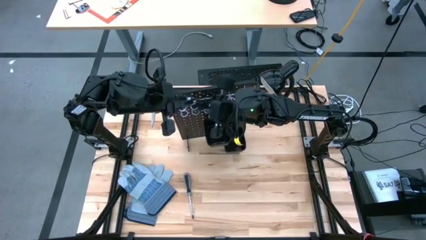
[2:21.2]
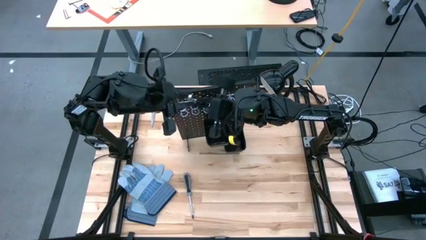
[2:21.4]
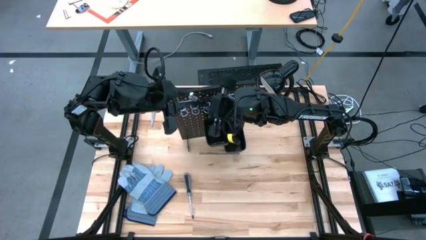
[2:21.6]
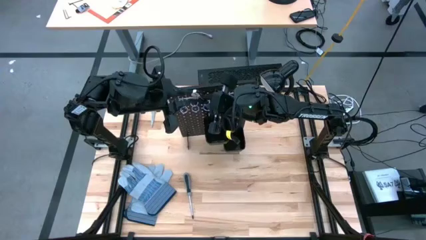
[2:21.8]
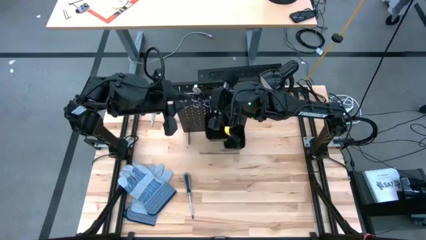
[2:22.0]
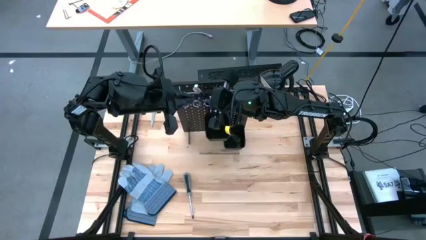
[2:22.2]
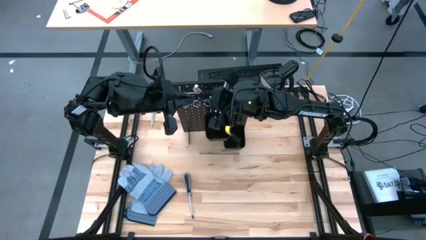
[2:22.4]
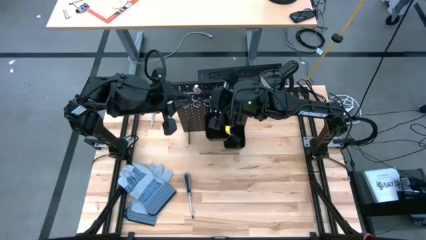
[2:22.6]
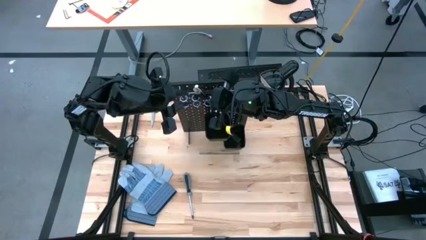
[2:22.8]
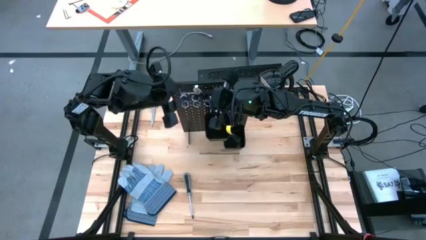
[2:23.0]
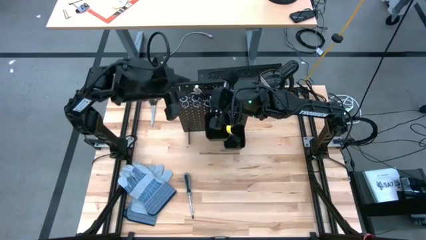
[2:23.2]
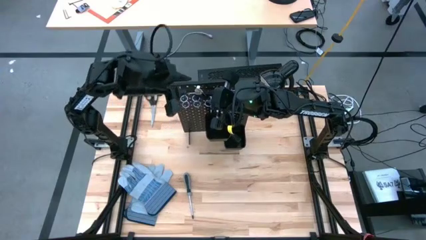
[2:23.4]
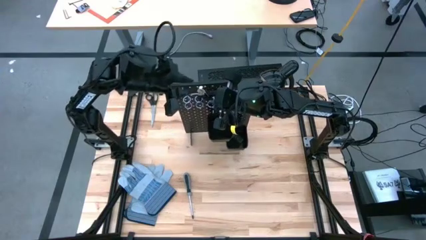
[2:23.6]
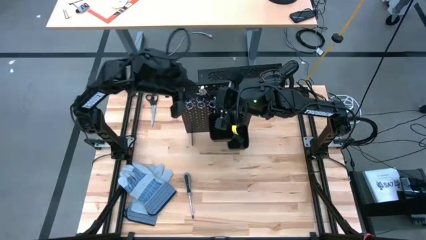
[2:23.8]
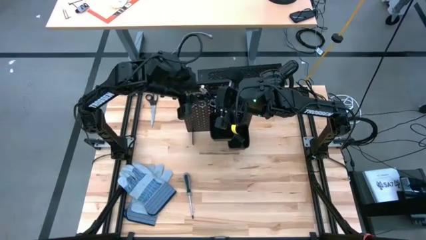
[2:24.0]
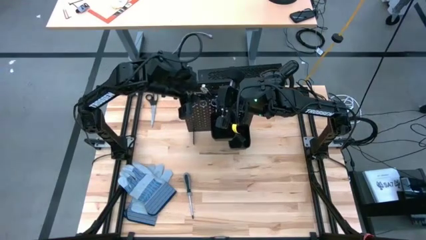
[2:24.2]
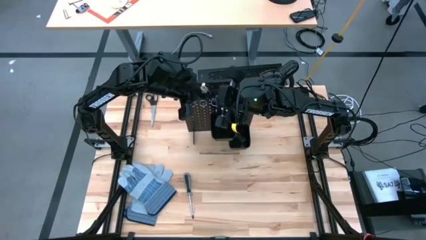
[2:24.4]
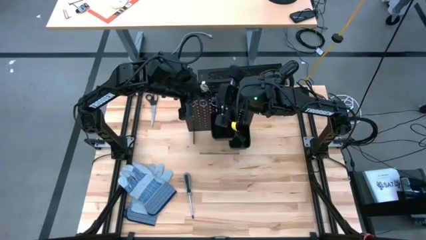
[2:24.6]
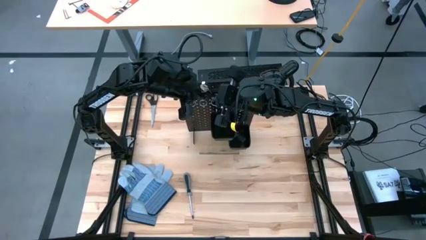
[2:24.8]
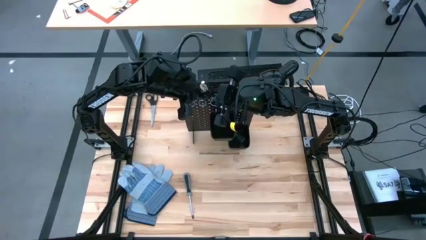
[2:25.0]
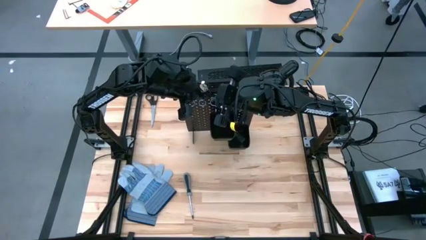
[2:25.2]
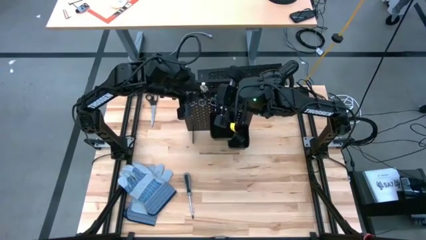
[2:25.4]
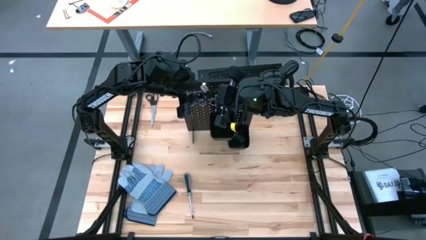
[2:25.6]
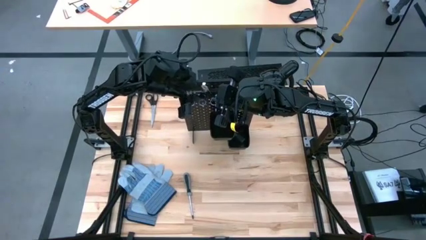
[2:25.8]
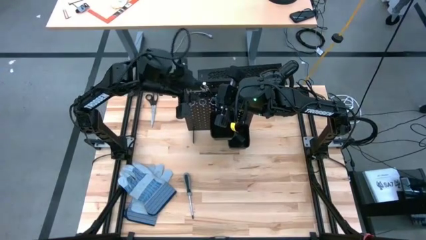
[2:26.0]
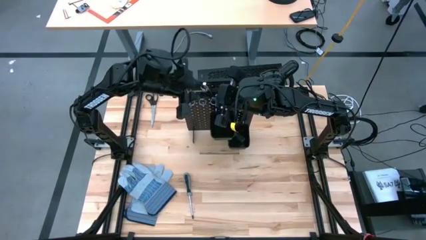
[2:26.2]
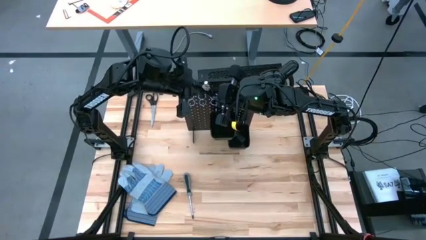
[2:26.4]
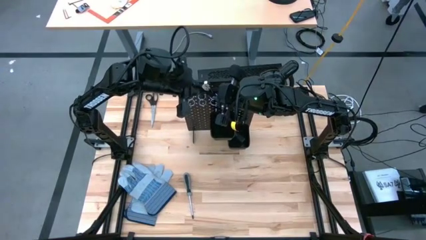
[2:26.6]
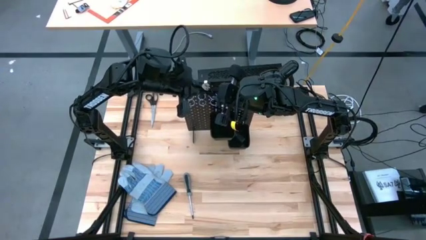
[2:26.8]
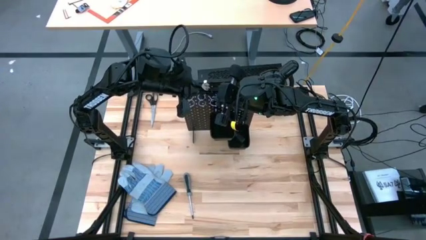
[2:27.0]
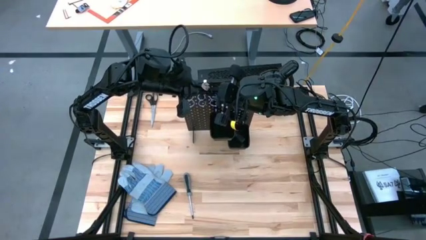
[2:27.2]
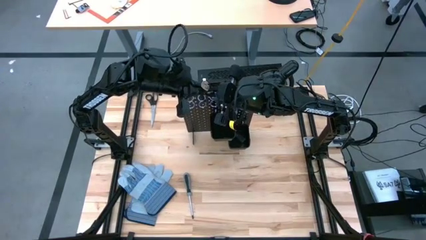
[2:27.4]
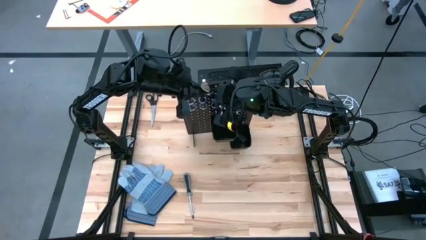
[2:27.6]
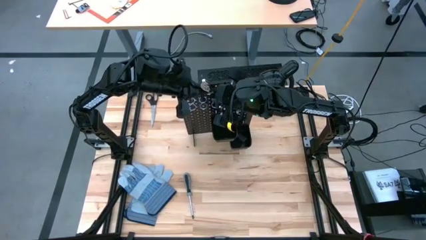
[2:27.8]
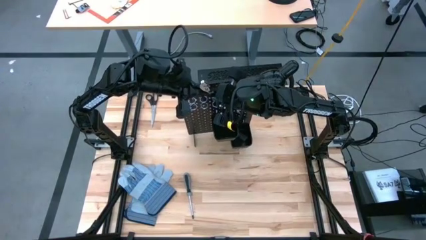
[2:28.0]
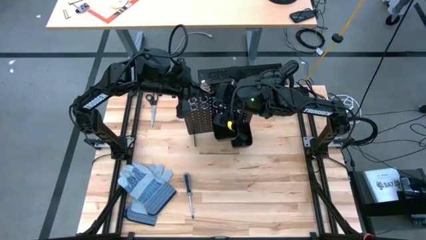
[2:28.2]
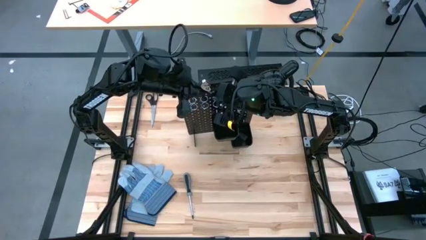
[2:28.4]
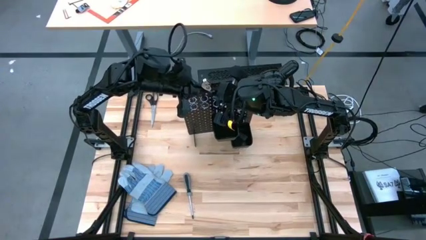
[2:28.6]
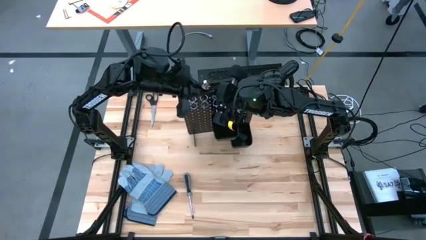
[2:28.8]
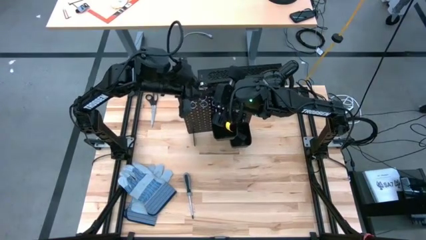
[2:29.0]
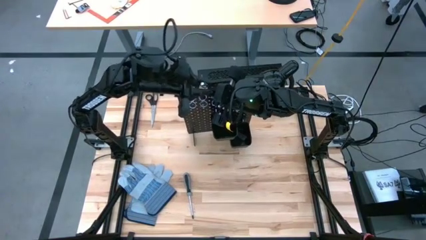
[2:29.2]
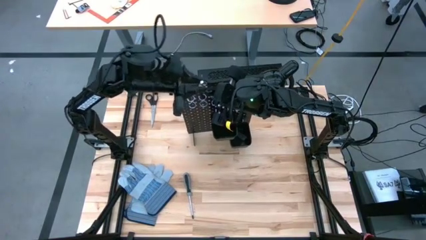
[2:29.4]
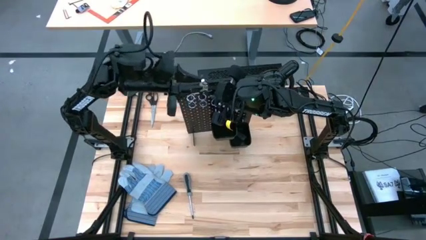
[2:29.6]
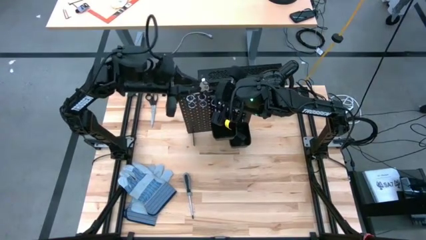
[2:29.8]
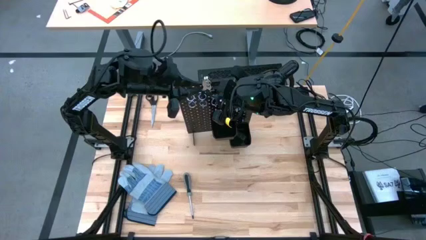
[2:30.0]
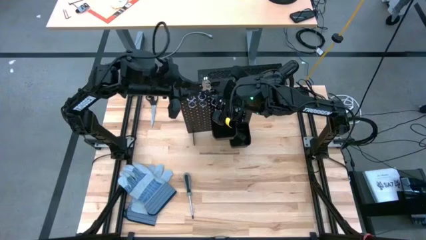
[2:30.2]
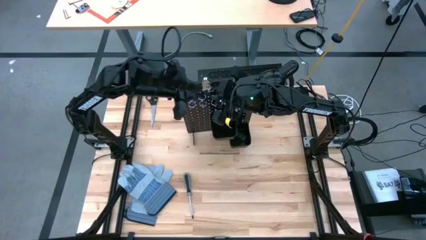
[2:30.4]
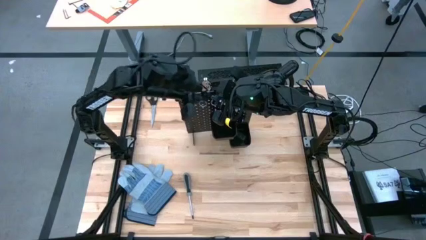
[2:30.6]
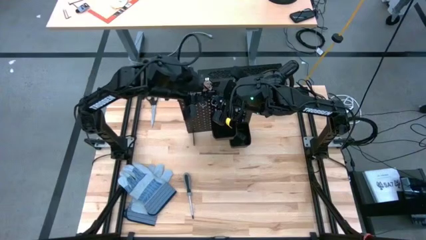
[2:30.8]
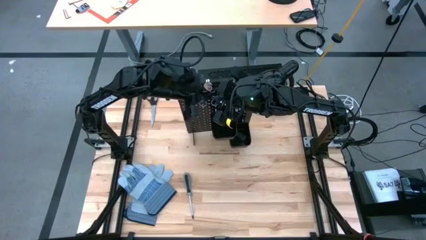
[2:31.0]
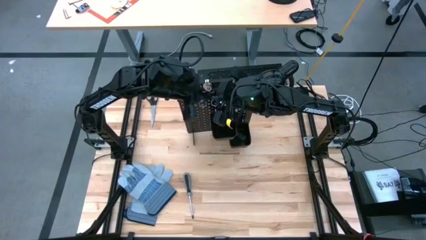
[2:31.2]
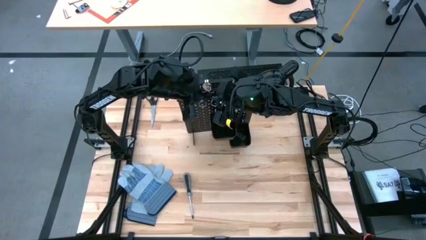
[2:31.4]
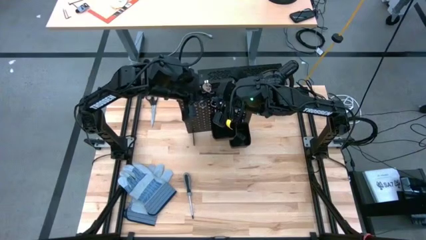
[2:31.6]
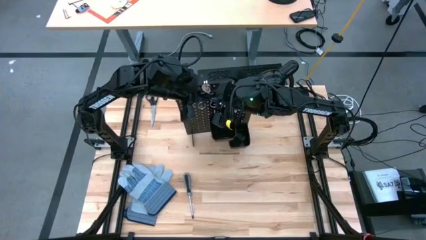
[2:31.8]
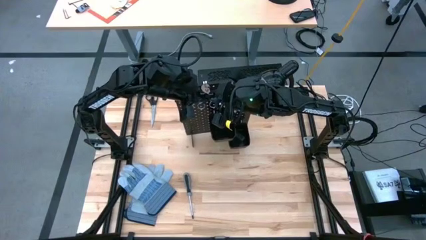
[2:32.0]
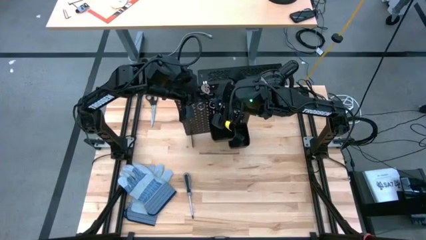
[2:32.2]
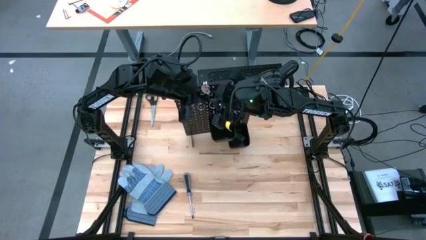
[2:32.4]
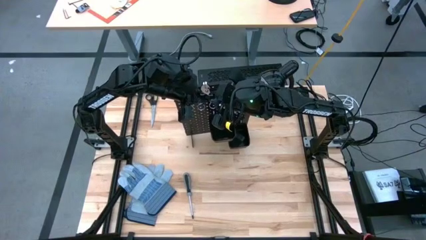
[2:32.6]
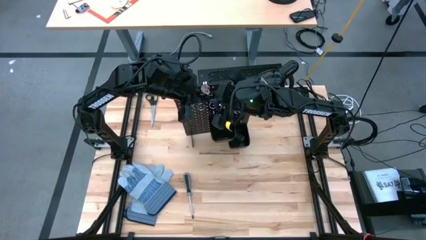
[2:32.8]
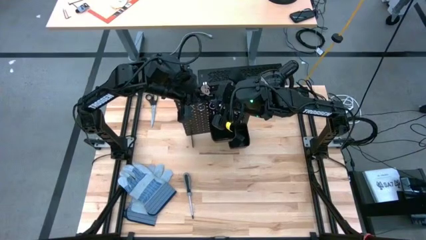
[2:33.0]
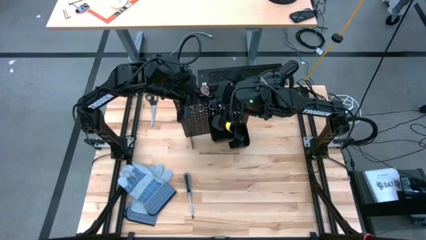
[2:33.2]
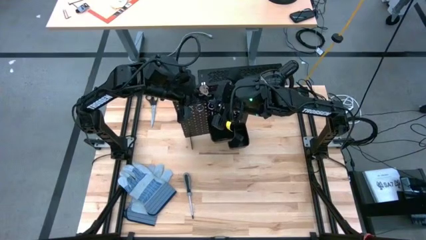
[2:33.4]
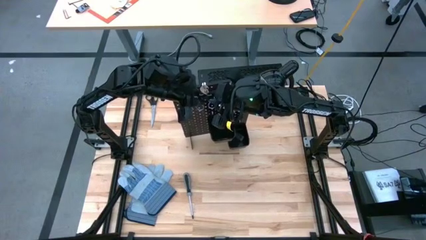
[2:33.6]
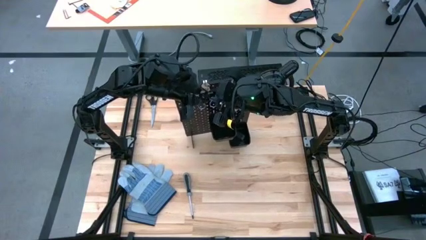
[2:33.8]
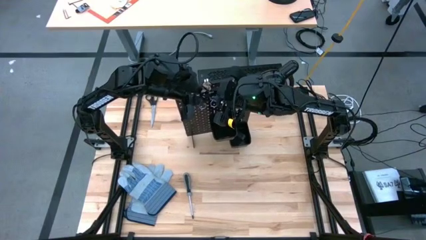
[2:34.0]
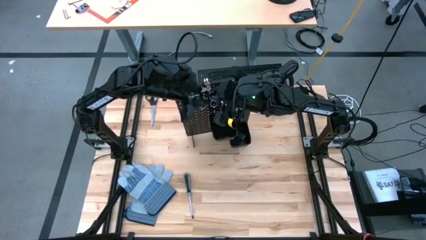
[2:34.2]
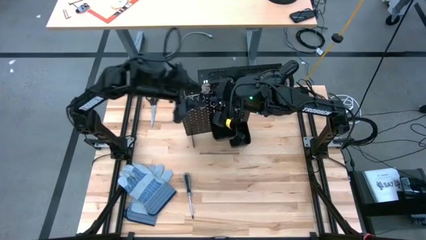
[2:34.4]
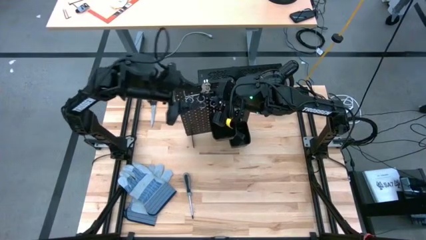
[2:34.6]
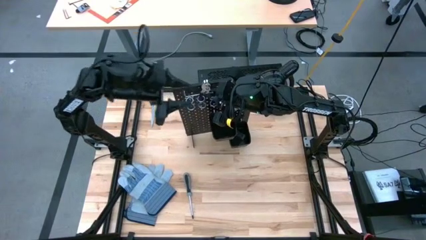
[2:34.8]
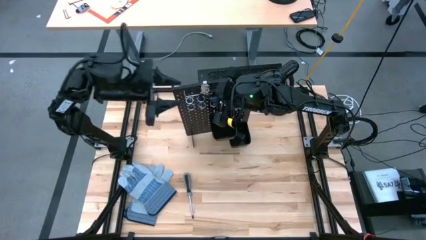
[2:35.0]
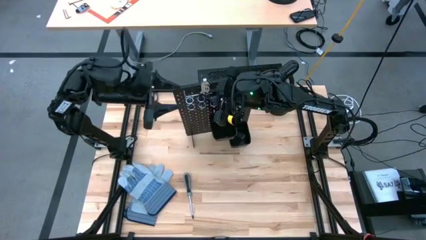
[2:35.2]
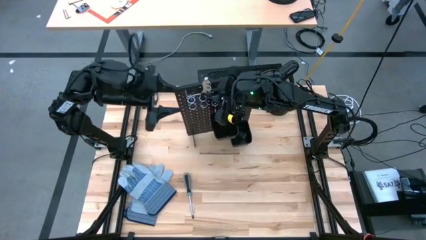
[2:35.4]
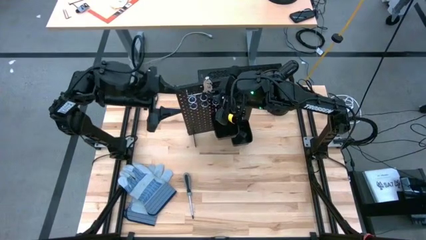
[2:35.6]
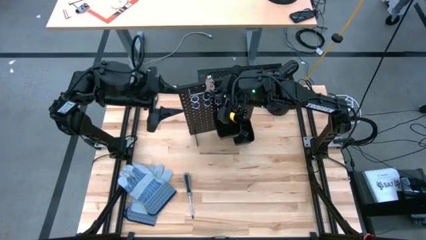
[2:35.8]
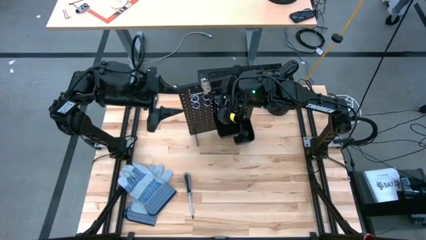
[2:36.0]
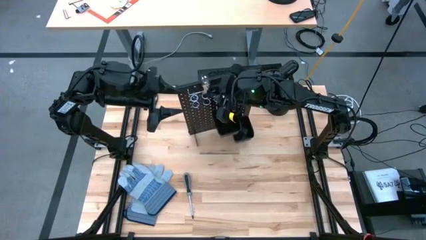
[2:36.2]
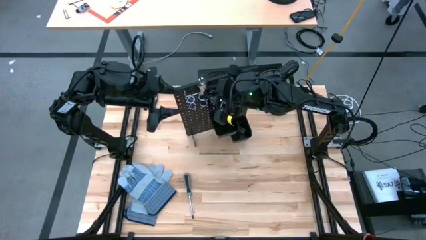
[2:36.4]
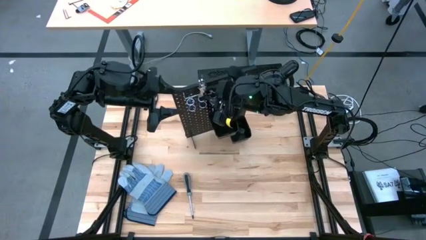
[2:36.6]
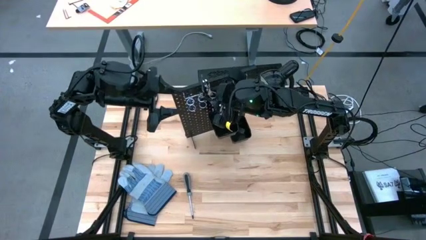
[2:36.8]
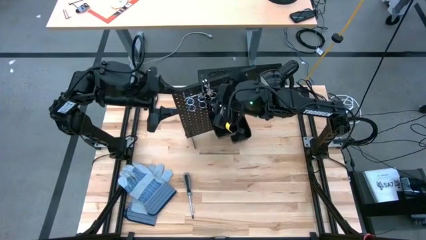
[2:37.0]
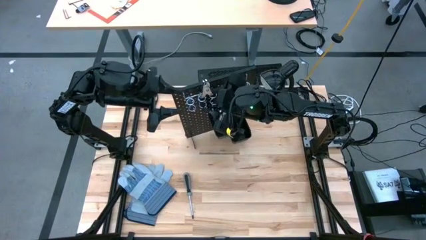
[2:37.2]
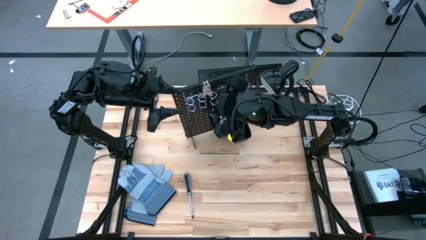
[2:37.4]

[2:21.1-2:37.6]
Task: Hang tools onto peg board
Hang the black pliers on the black pegboard
